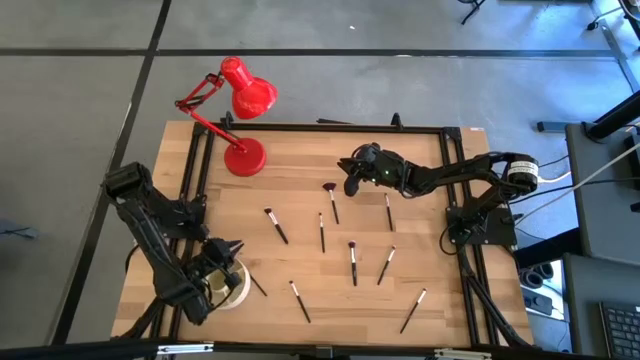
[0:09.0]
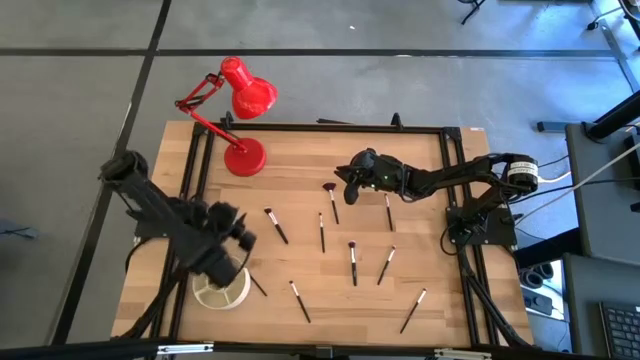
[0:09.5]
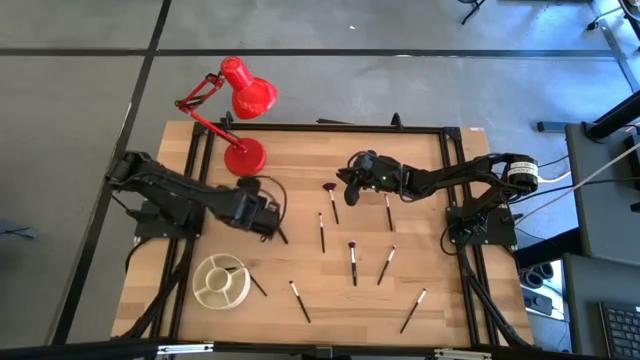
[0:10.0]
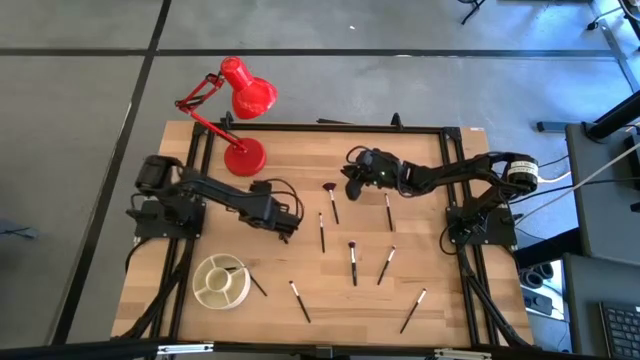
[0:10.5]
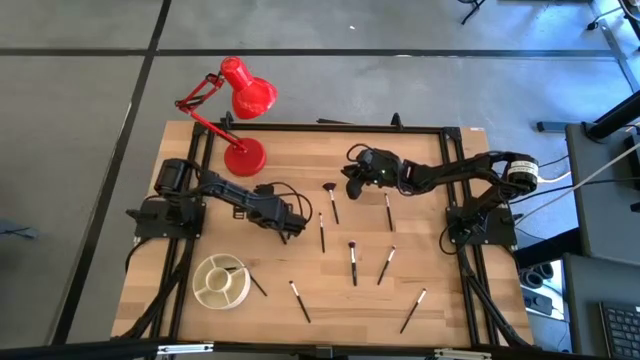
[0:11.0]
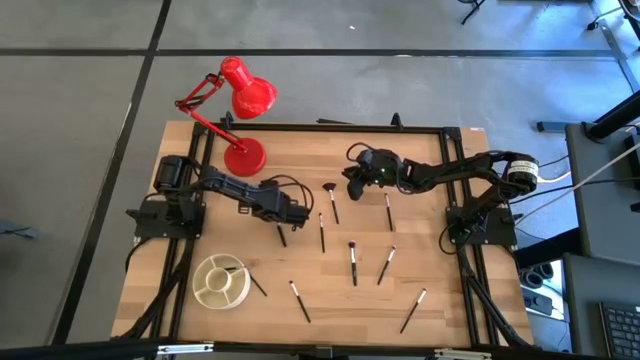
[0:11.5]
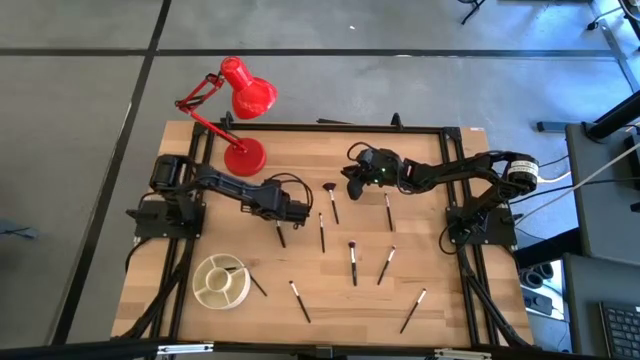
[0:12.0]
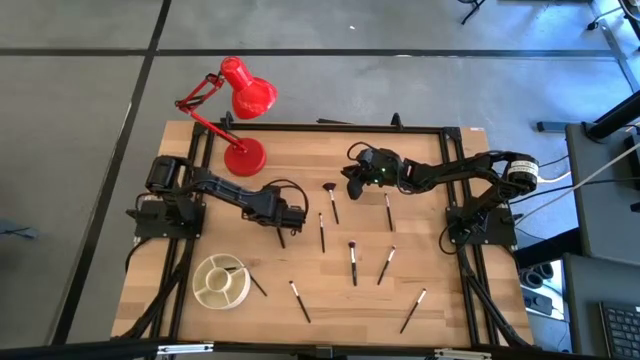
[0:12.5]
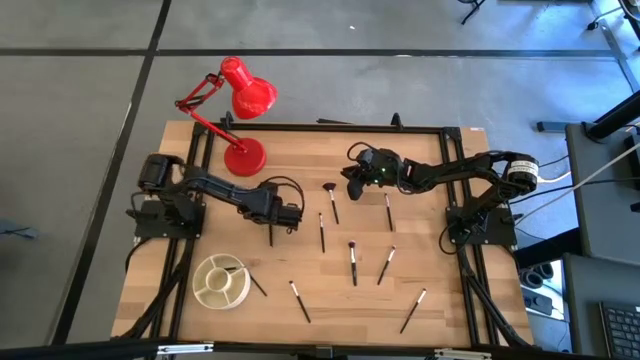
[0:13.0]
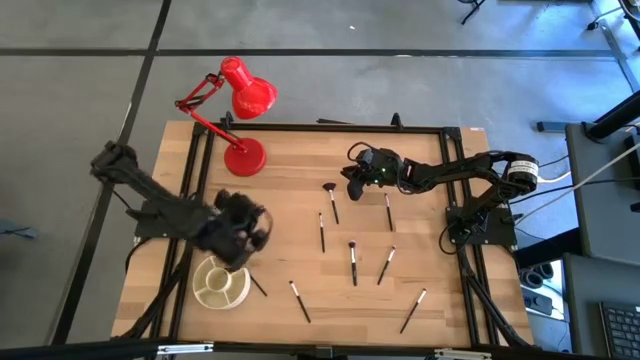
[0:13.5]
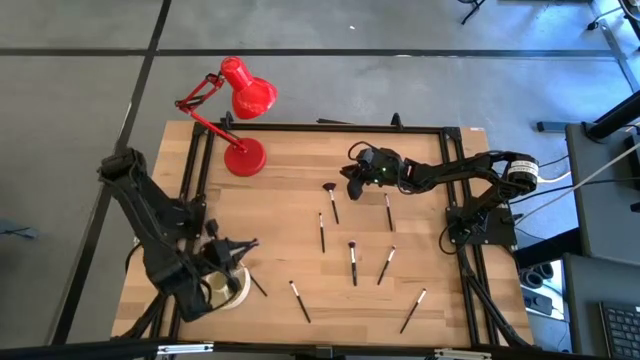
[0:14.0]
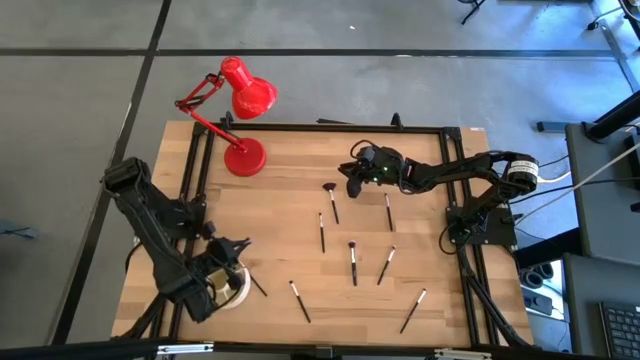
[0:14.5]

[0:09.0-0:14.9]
Task: Put items in baskets/containers
Put the black powder brush into the white organizer bin

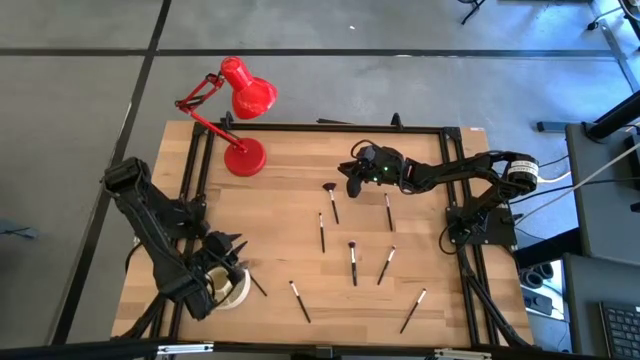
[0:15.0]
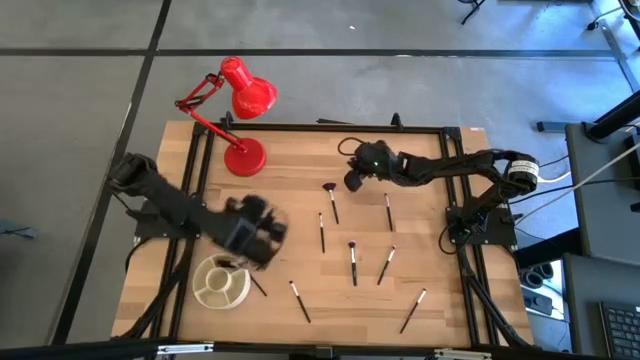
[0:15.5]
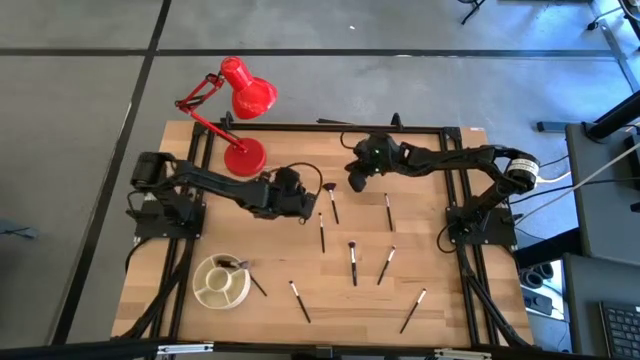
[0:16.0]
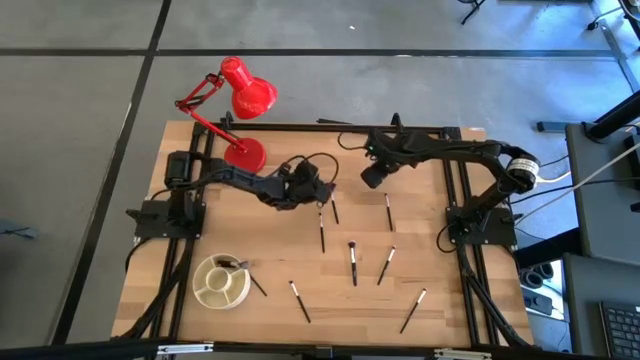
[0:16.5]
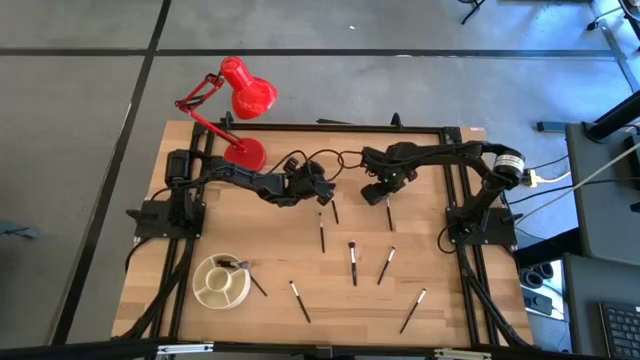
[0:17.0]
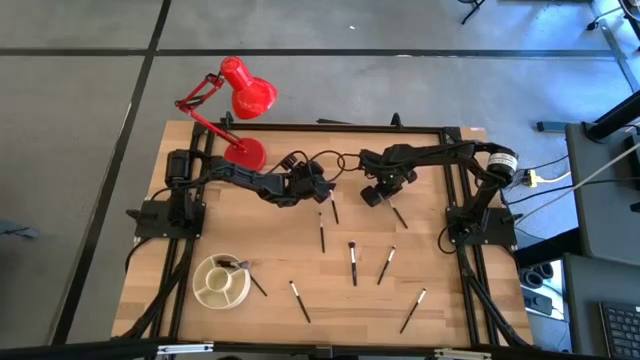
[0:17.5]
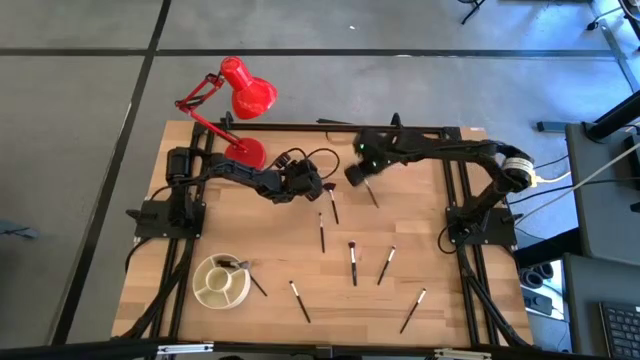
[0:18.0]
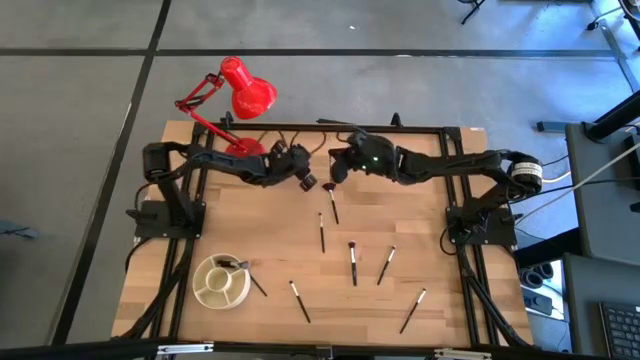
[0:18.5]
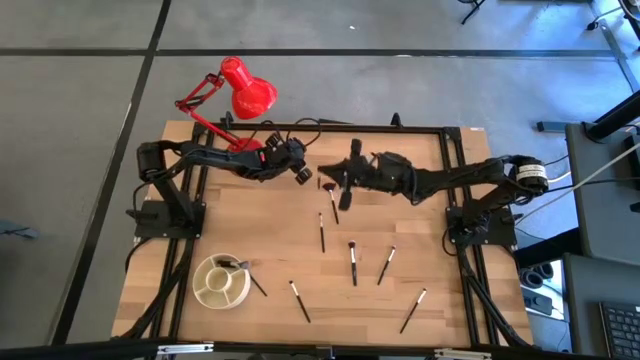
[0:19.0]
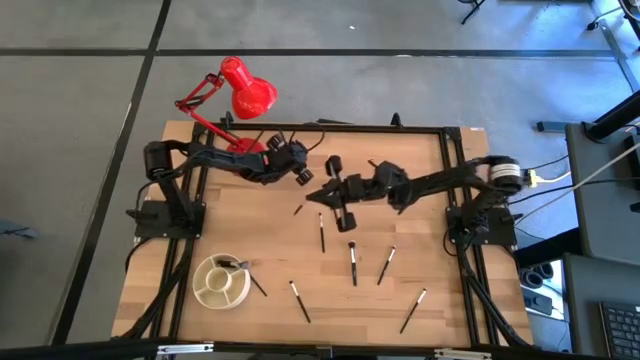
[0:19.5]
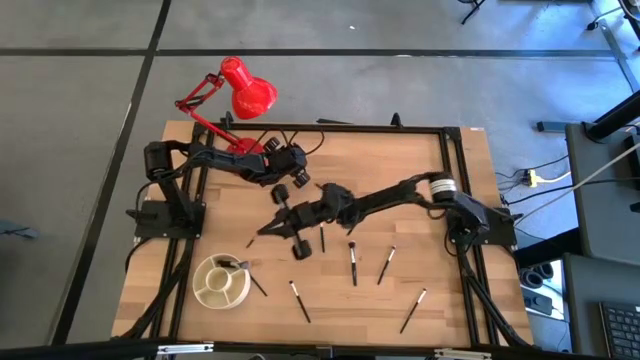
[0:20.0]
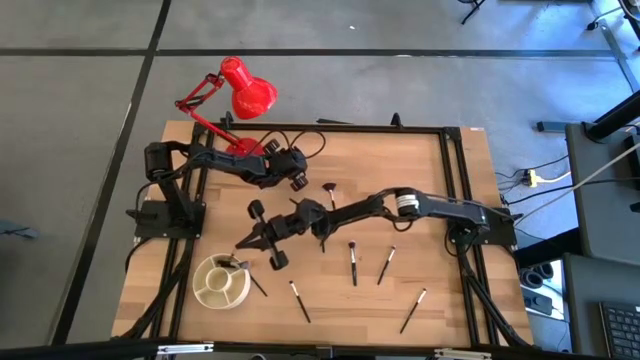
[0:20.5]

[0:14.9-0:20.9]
Put the black eyeshadow brush into the white organizer bin

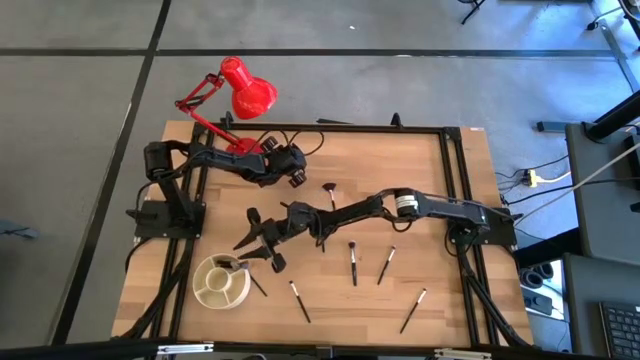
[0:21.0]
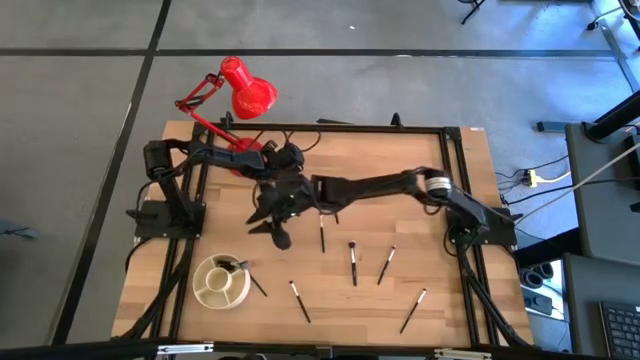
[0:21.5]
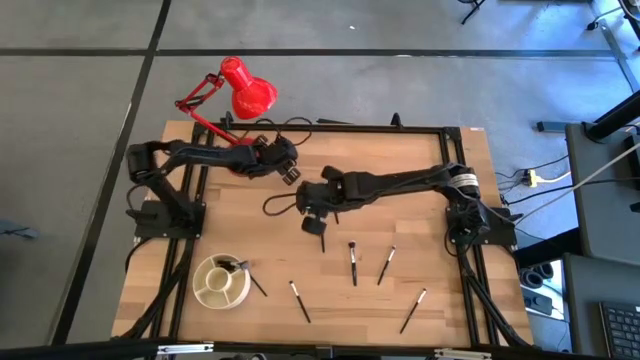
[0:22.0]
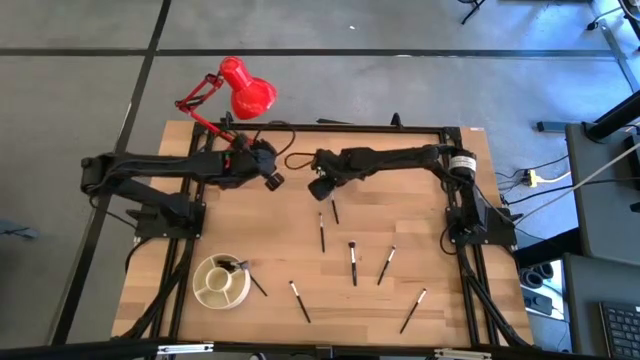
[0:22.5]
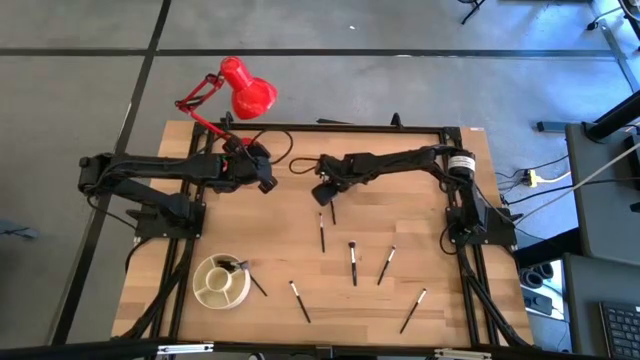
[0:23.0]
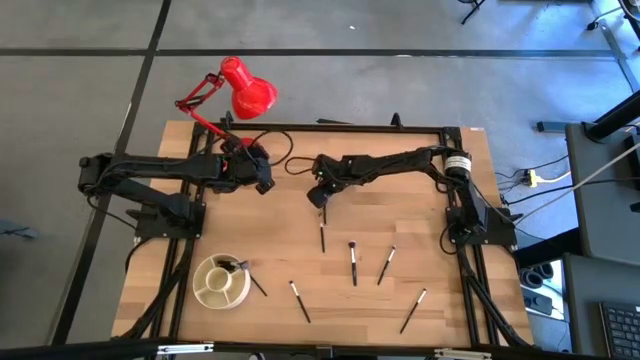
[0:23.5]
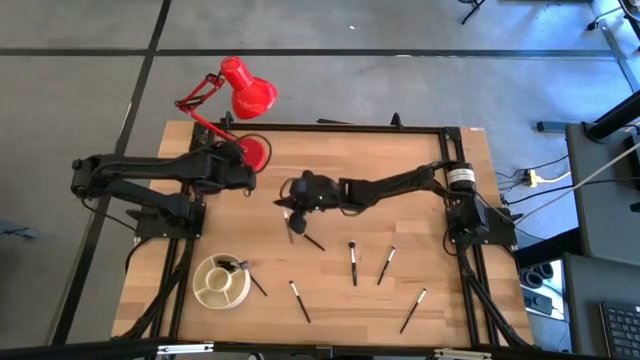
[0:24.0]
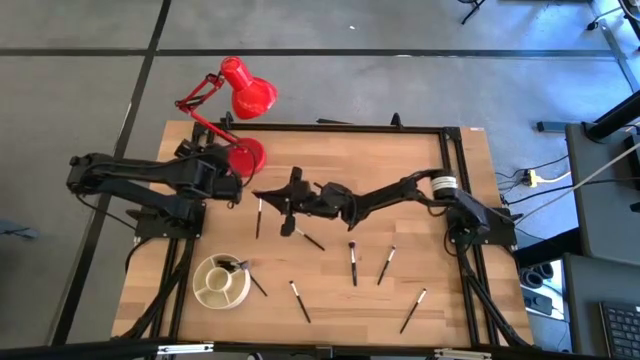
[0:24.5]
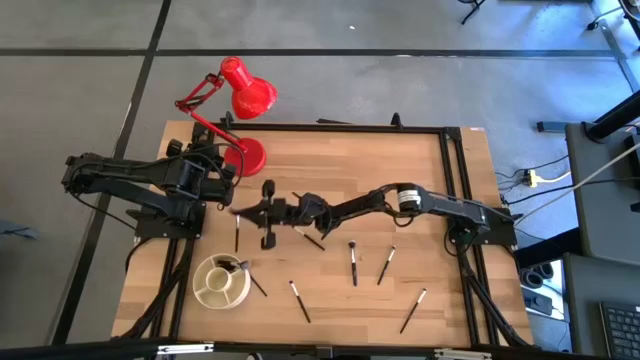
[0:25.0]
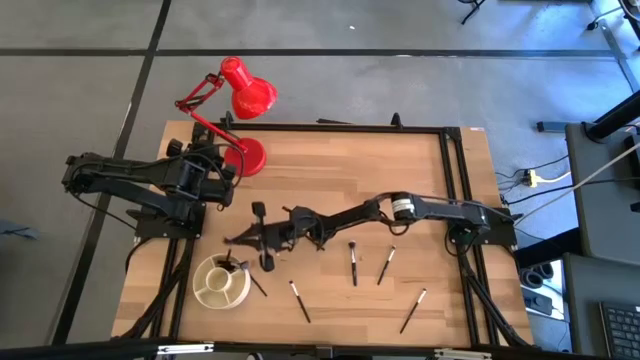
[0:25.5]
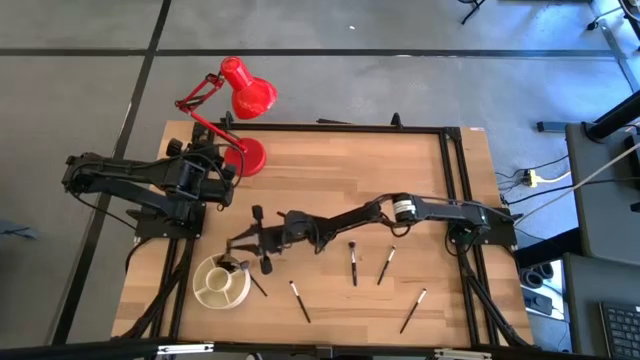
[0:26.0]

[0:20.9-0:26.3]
Put the black highlighter brush into the white organizer bin

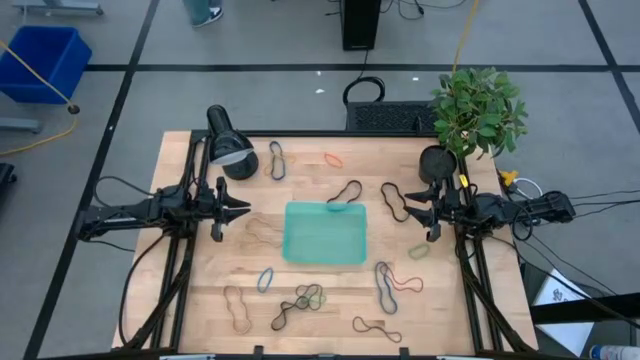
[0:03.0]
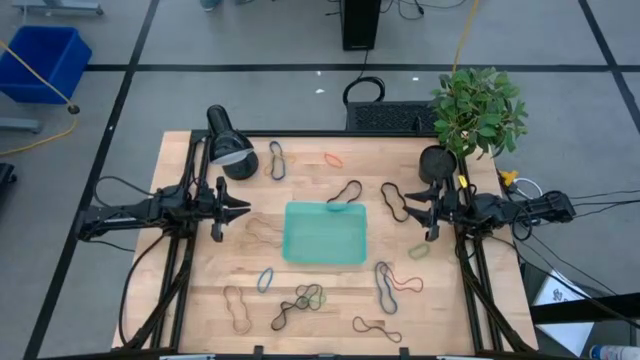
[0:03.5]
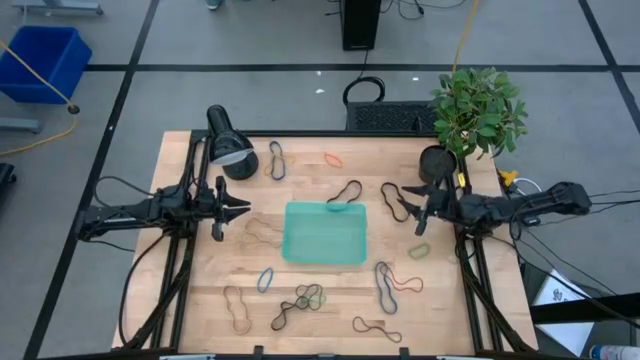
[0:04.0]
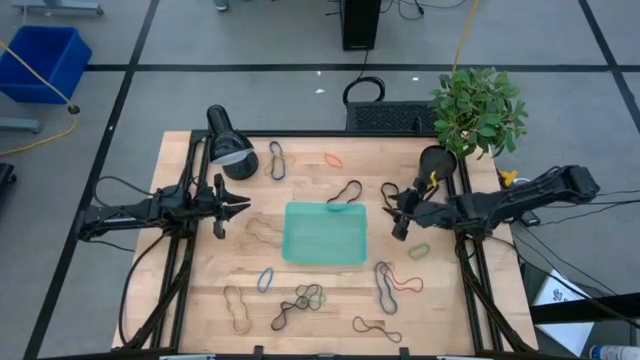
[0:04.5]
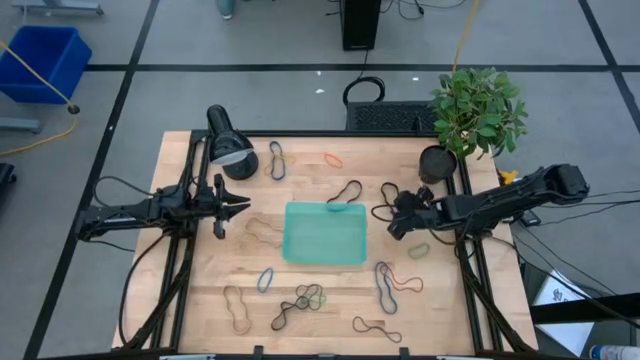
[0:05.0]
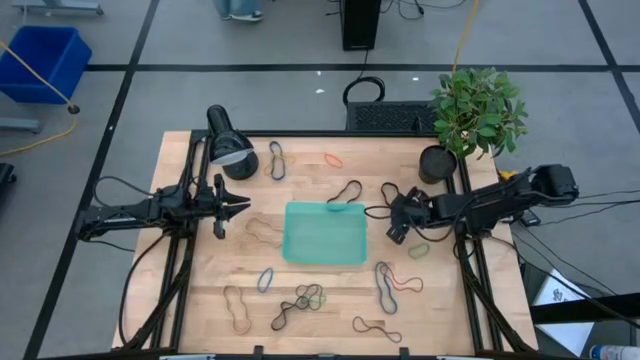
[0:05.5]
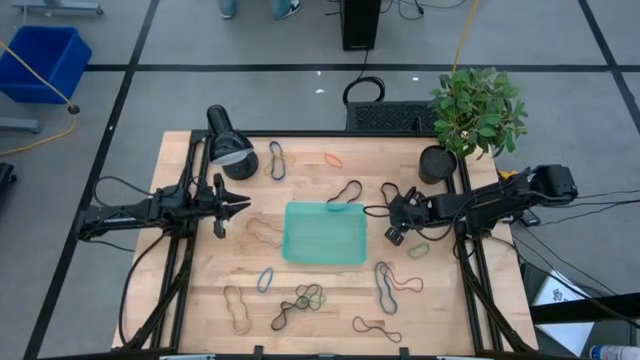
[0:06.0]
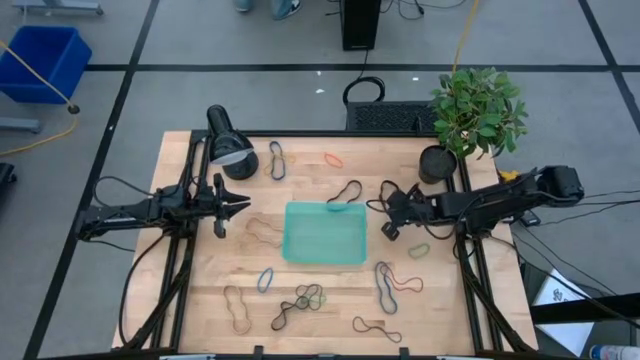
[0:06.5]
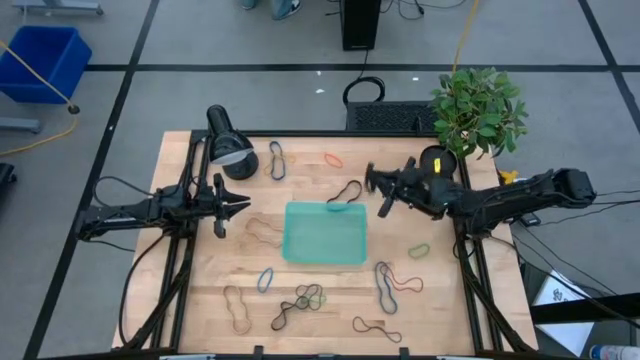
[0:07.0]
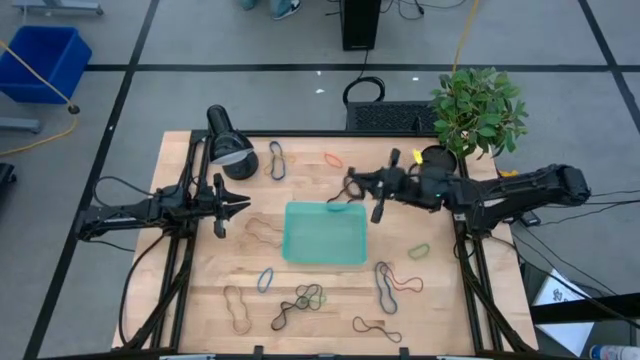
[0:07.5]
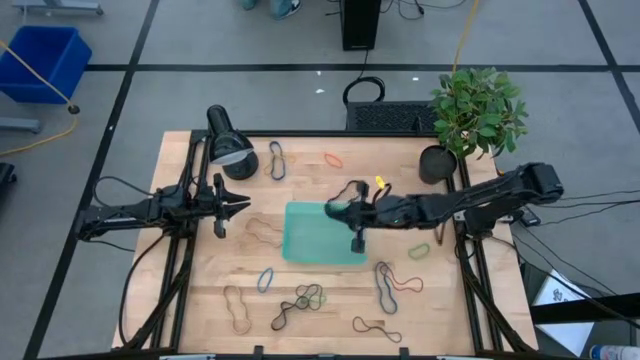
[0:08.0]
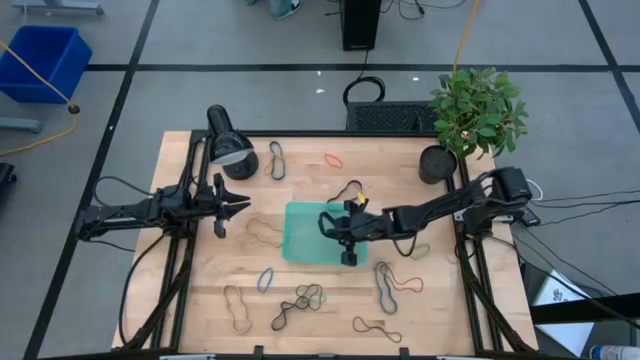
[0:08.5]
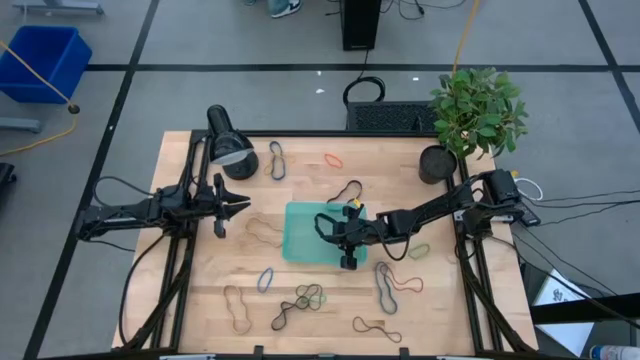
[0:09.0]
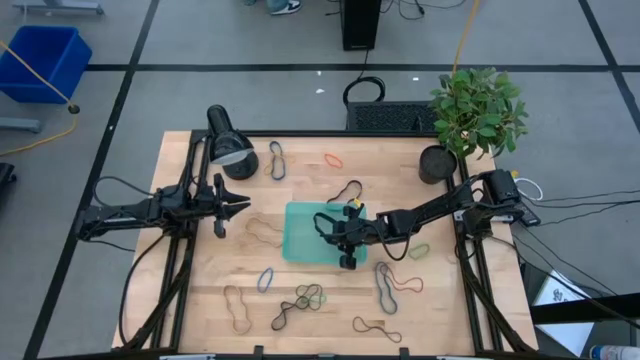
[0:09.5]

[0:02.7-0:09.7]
Task: Pick and place rubber bands into bin
Put the black rubber band into the green bin
